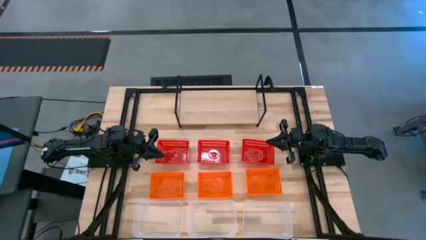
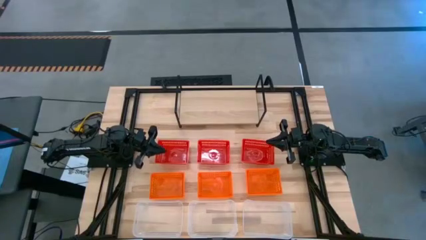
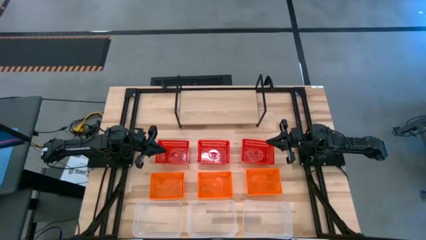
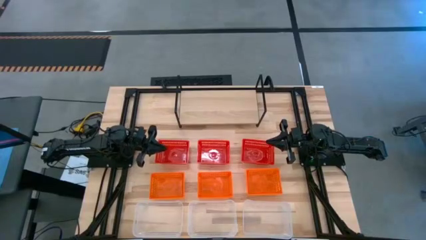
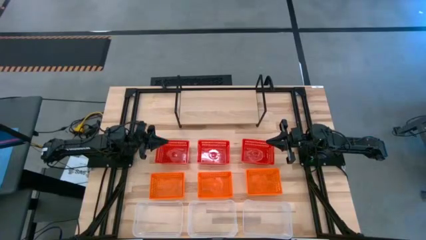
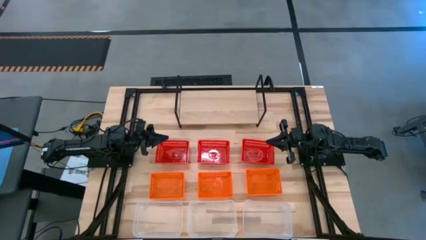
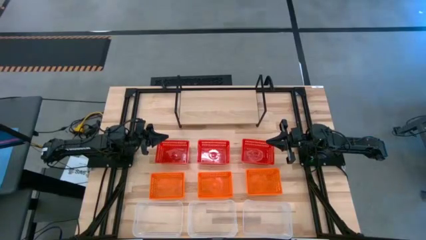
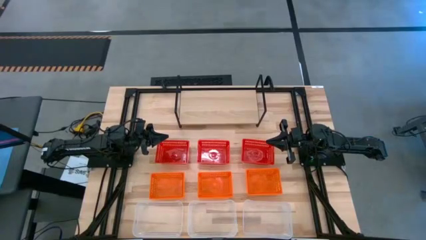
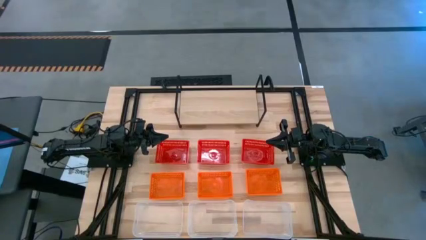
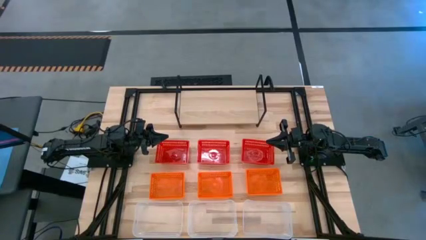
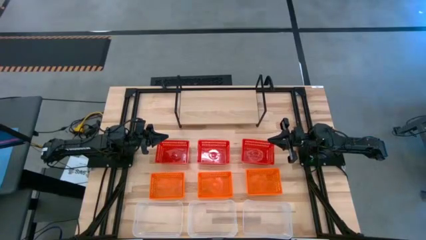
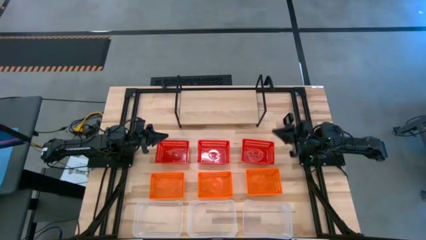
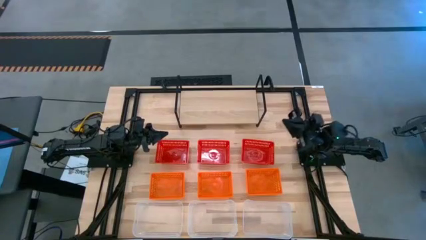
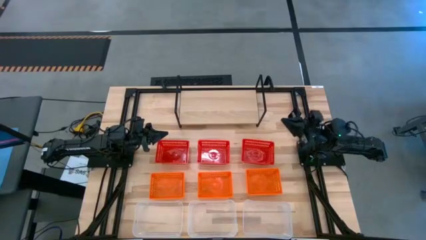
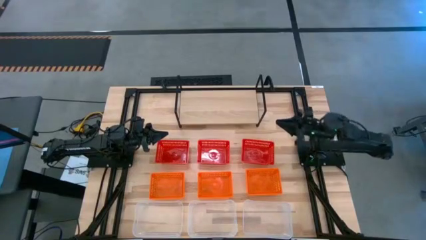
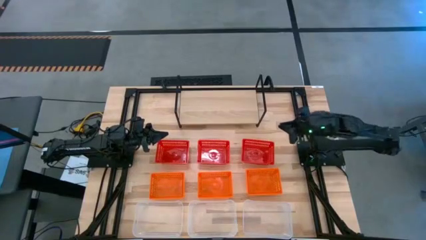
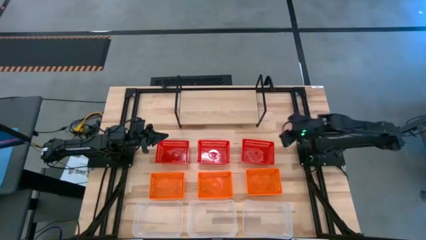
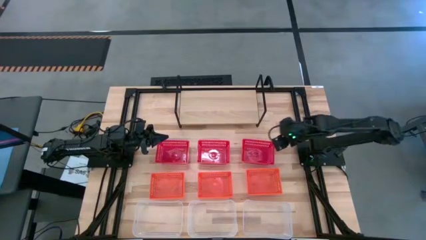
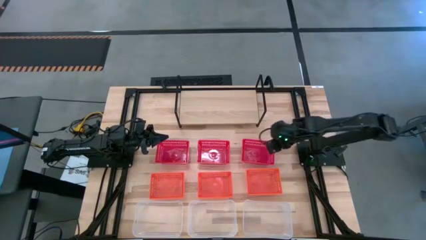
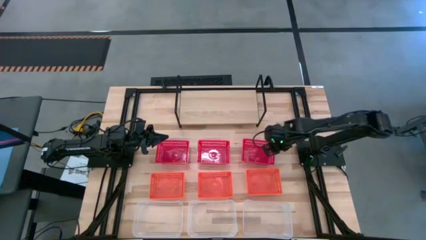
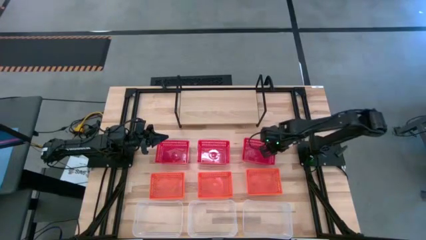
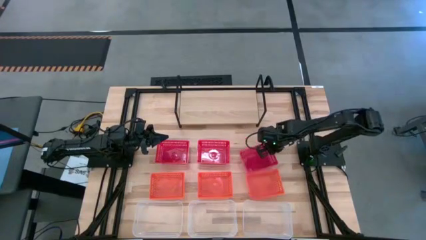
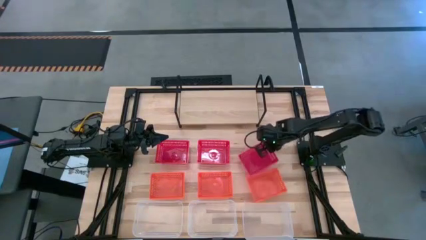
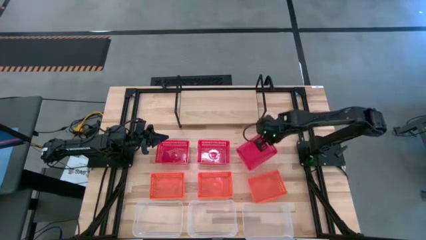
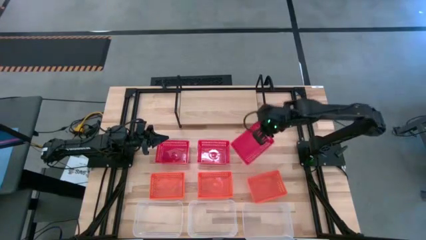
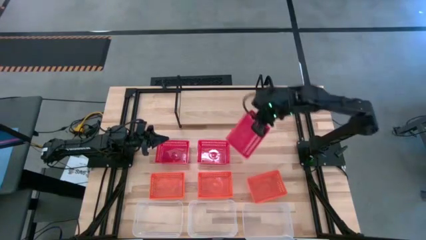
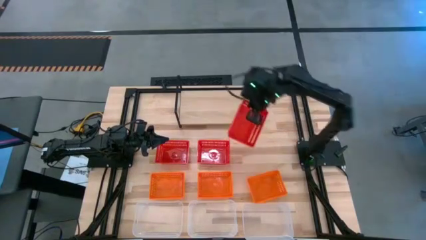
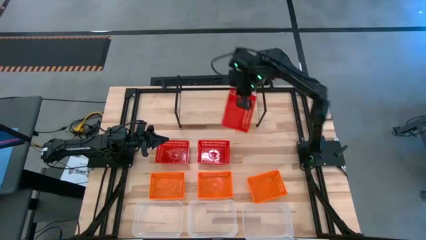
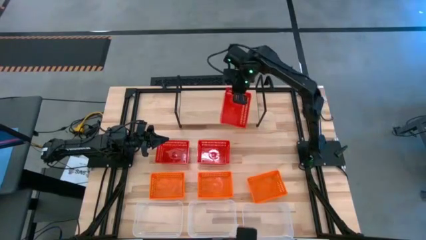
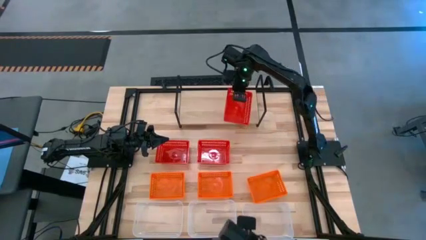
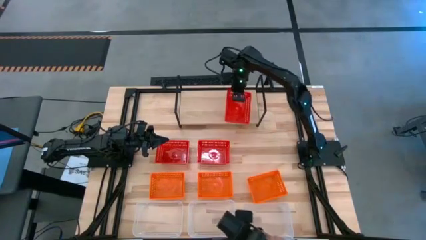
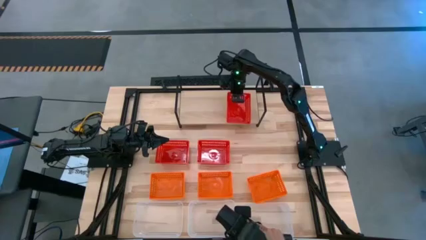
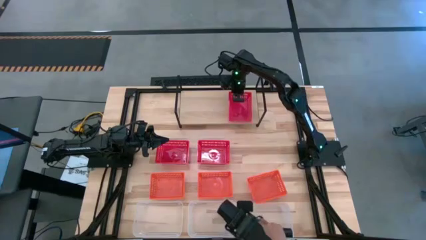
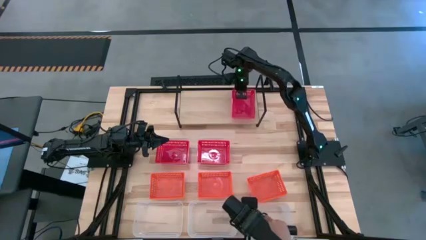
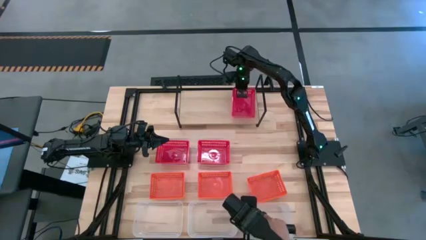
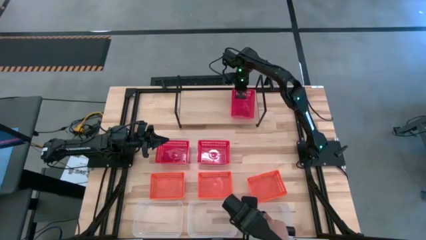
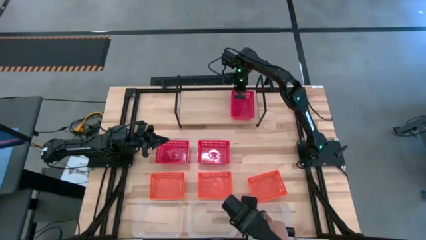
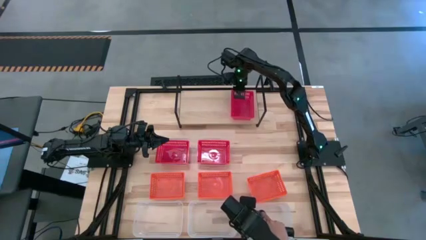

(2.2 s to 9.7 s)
Task: Stack baskets on shelf by color
Put the right red bin on the shelf

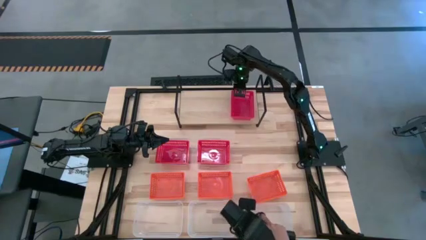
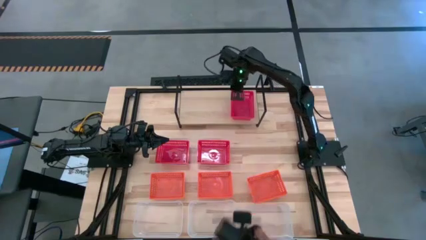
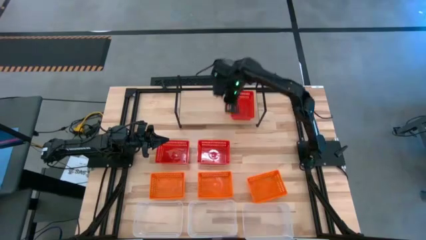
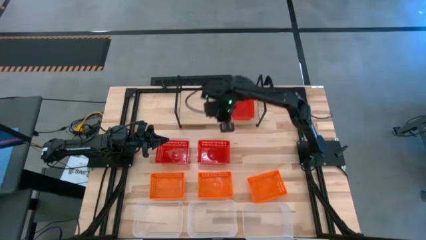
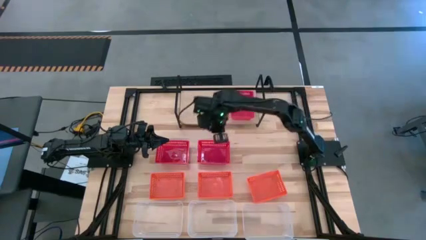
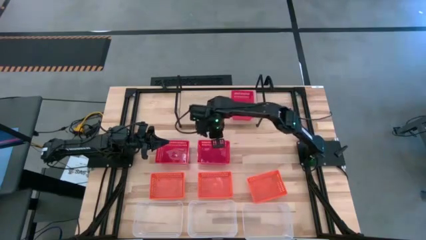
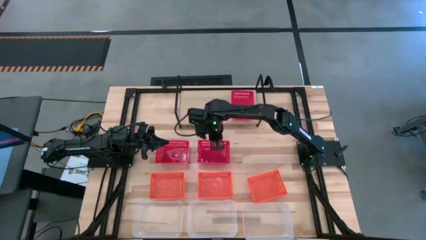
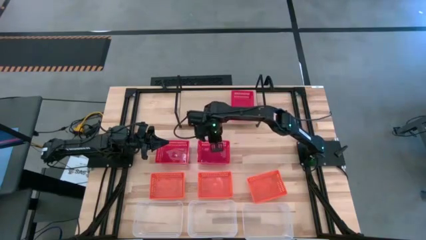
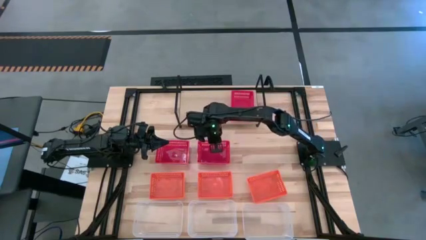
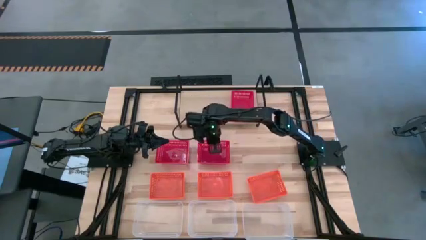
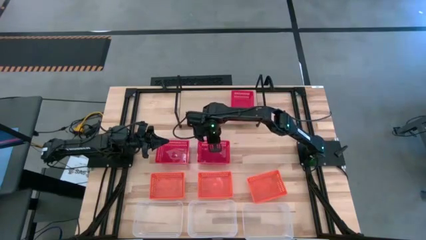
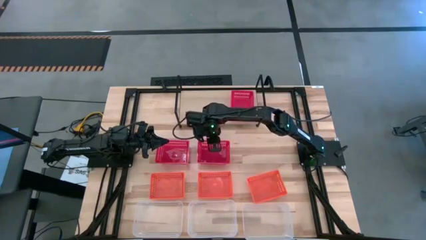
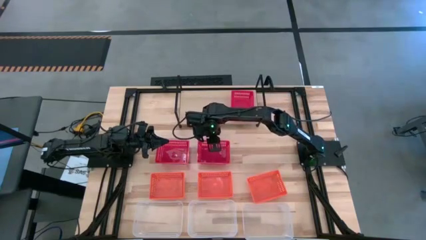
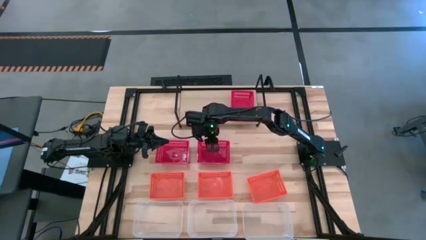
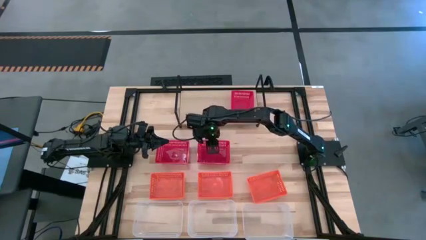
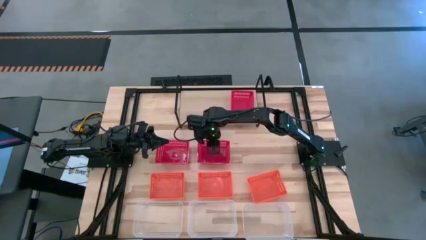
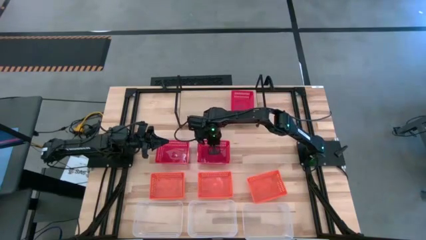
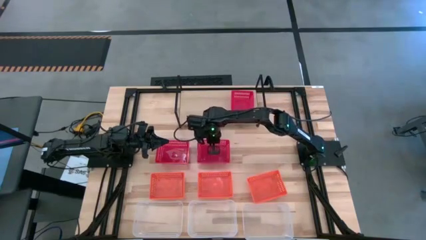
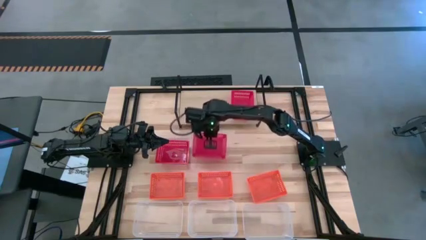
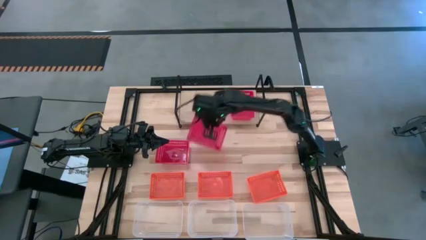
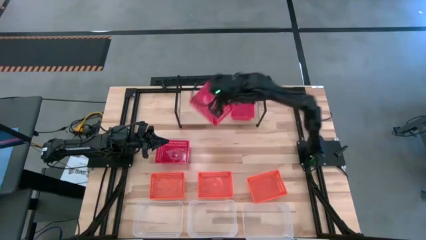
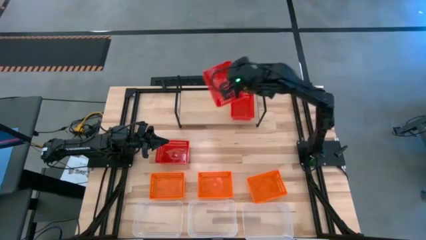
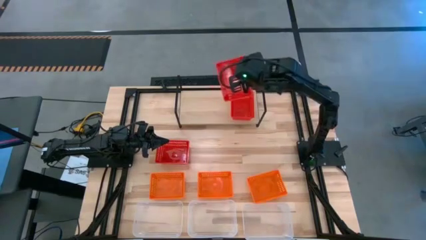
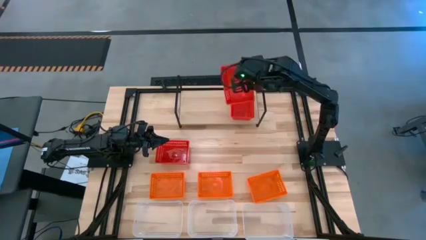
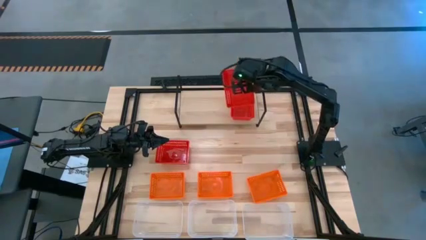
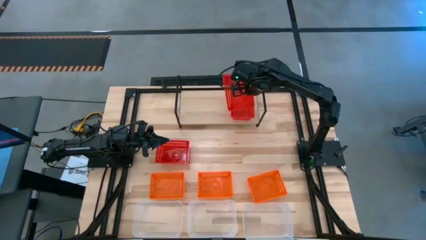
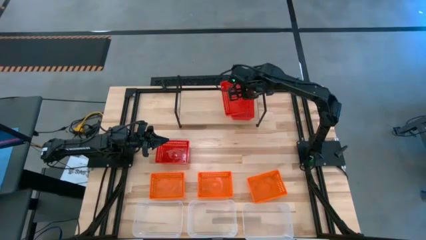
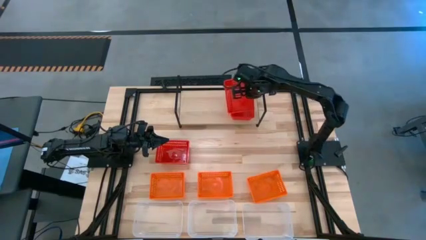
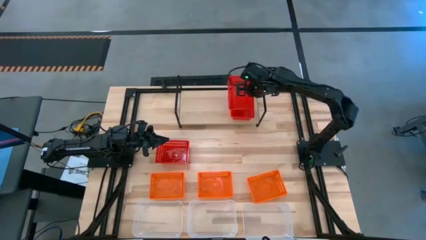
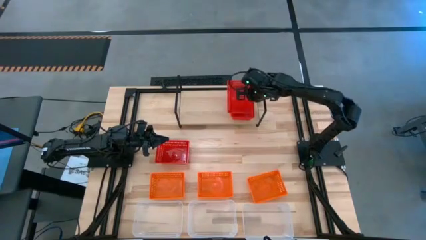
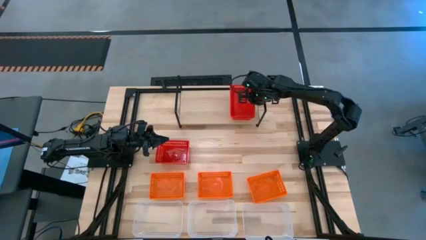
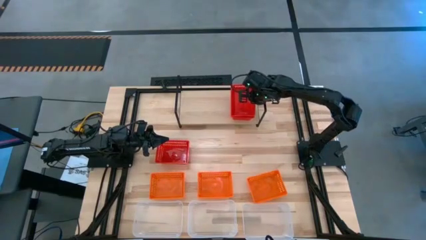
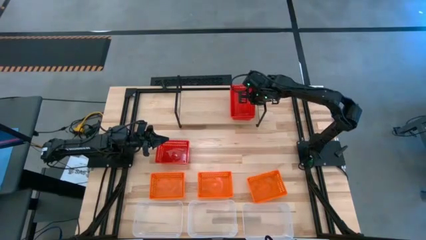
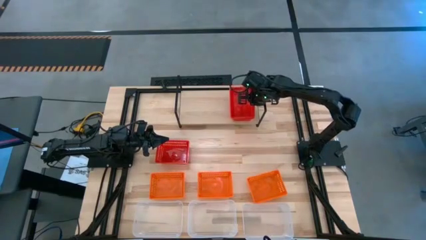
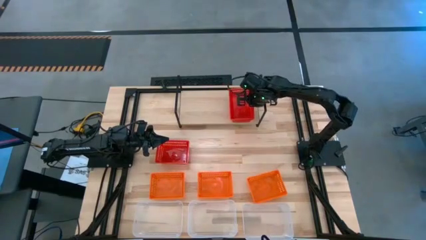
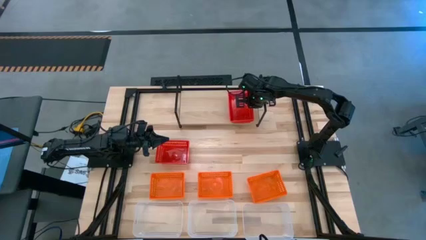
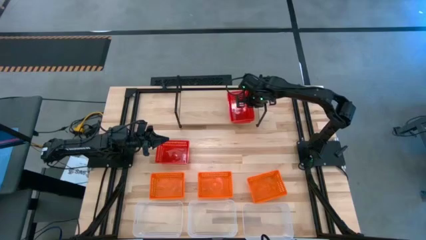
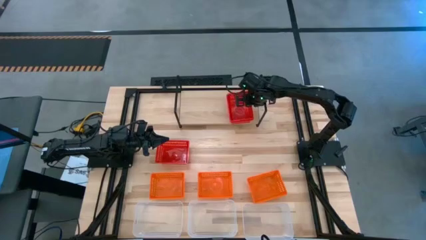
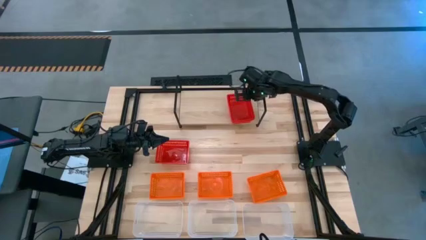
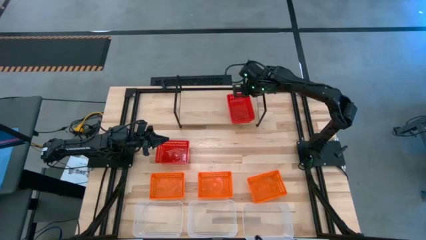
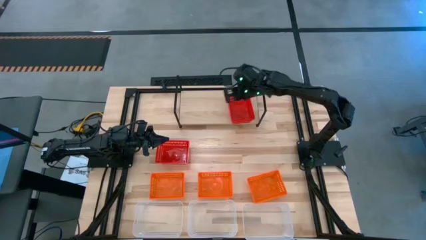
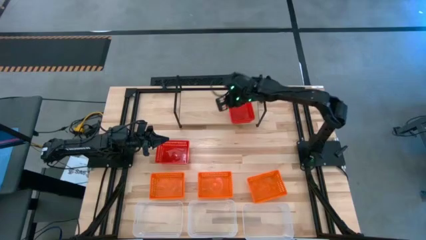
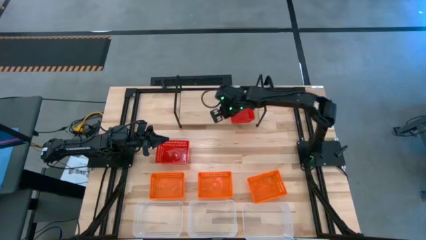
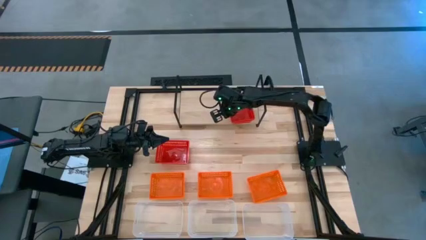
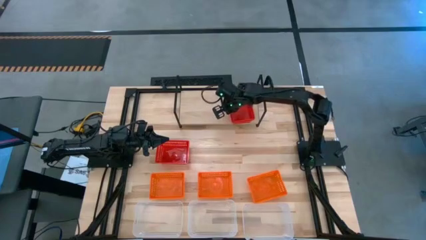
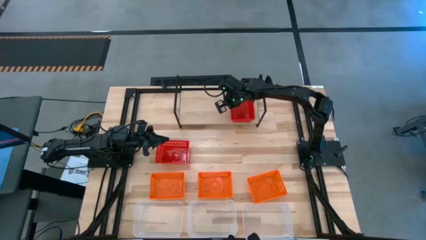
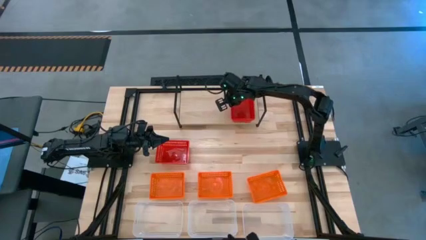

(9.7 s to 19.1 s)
Stack the right red bin on top of the red bin on the shelf

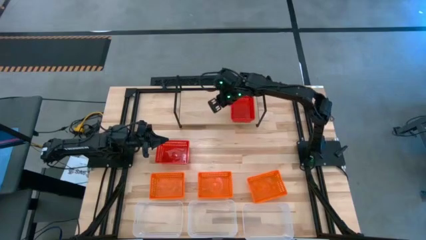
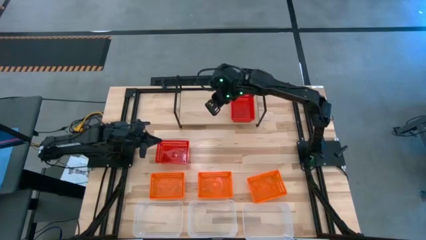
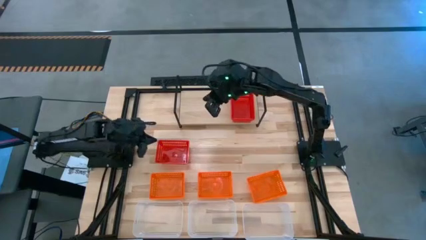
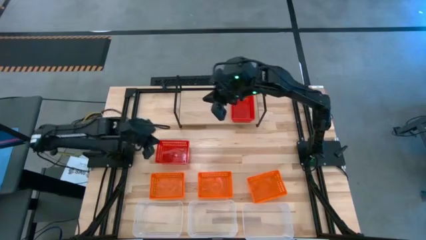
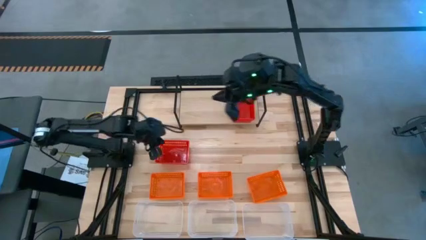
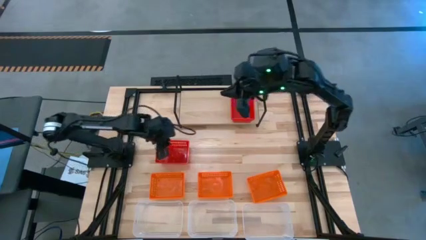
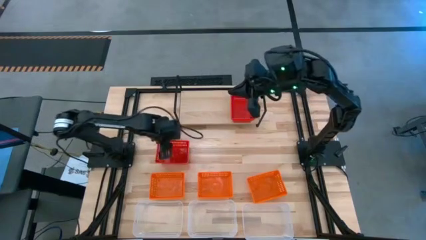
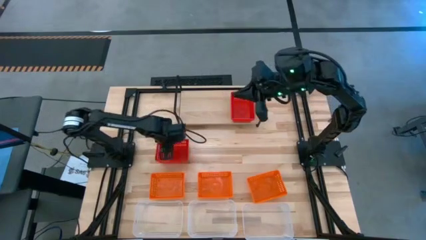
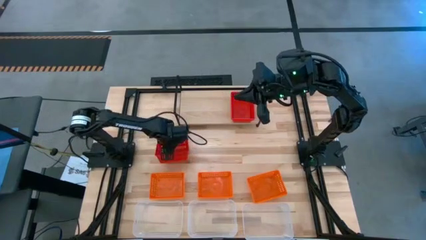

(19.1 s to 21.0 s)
Stack the red bin on top of the red bins on the shelf
